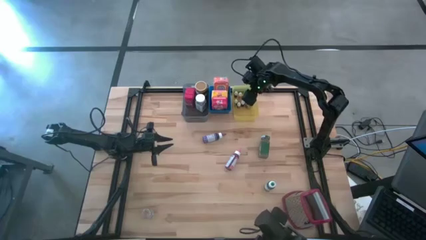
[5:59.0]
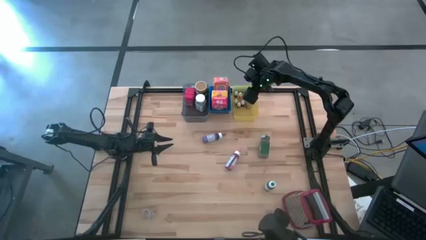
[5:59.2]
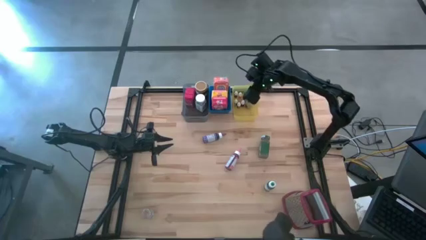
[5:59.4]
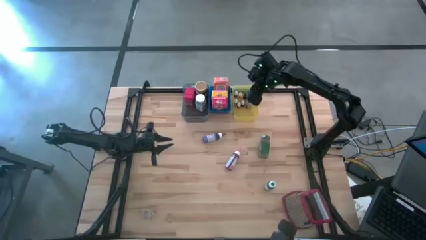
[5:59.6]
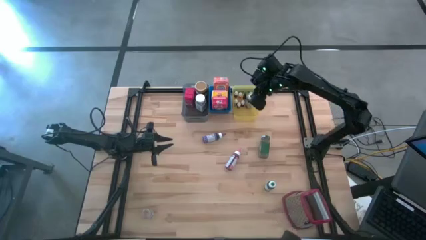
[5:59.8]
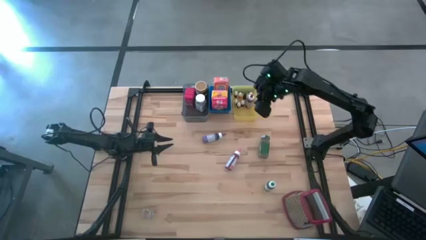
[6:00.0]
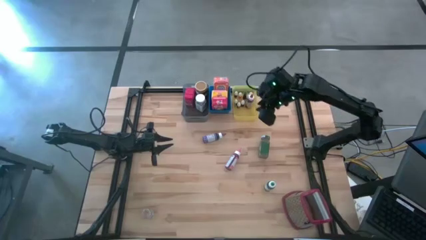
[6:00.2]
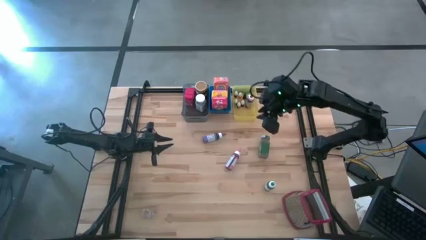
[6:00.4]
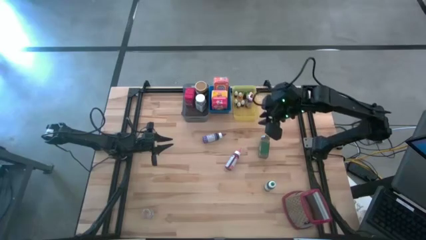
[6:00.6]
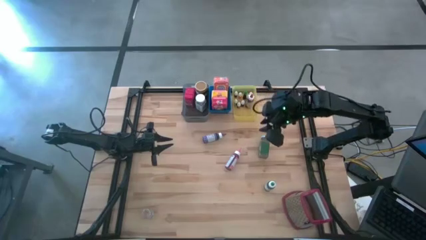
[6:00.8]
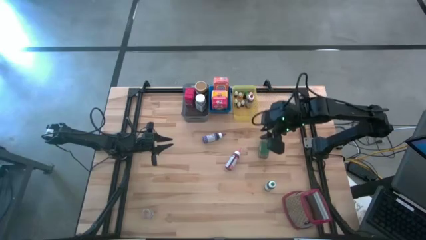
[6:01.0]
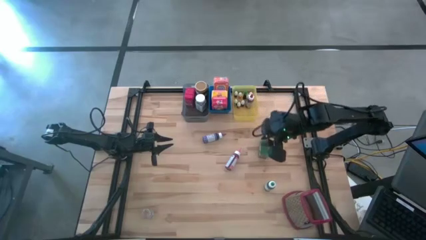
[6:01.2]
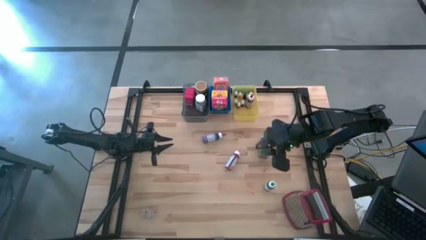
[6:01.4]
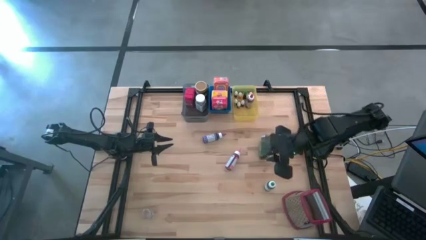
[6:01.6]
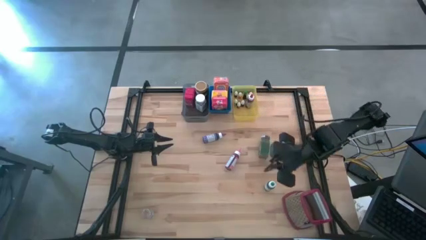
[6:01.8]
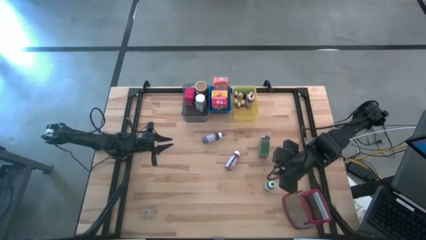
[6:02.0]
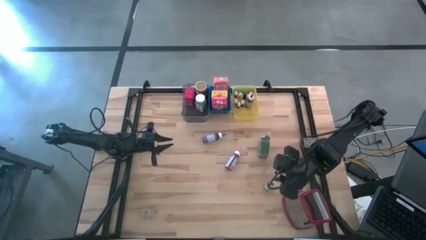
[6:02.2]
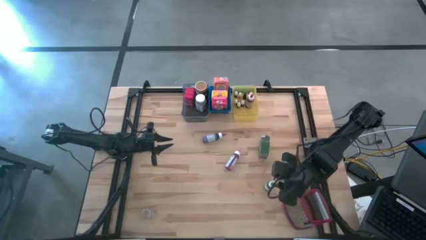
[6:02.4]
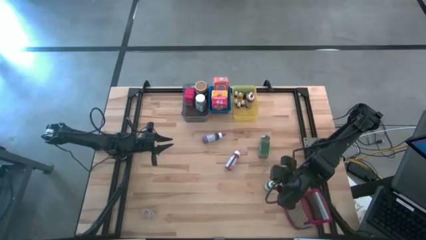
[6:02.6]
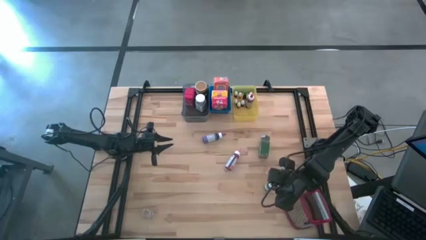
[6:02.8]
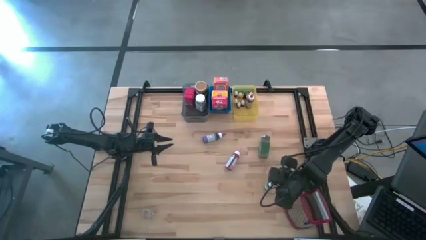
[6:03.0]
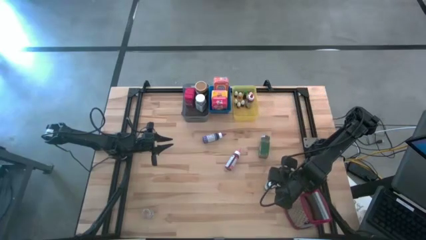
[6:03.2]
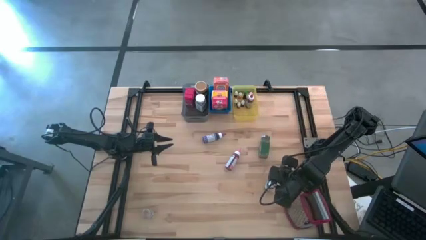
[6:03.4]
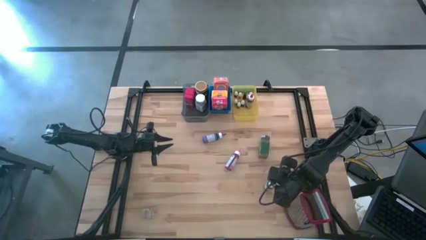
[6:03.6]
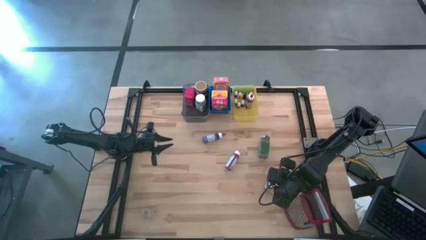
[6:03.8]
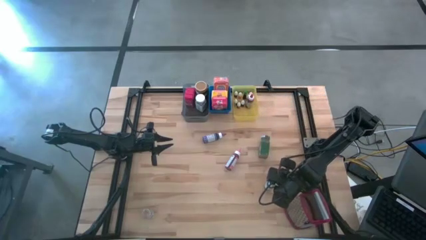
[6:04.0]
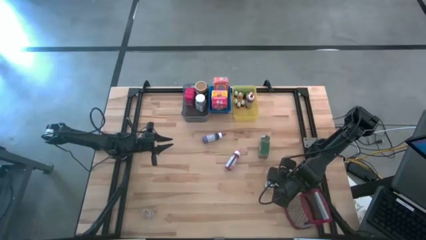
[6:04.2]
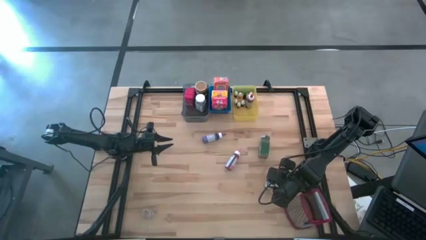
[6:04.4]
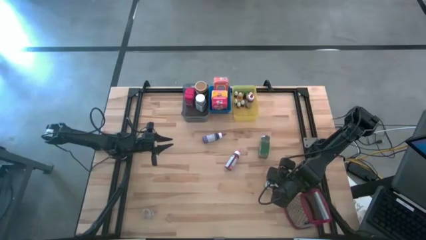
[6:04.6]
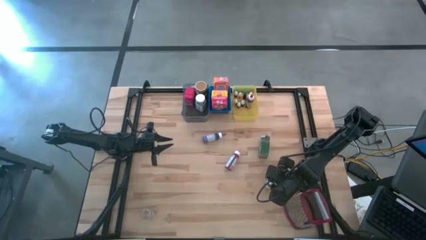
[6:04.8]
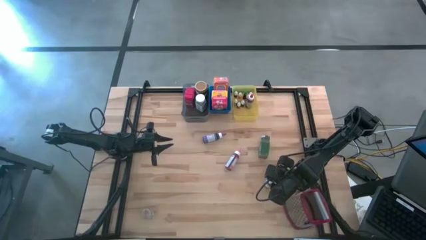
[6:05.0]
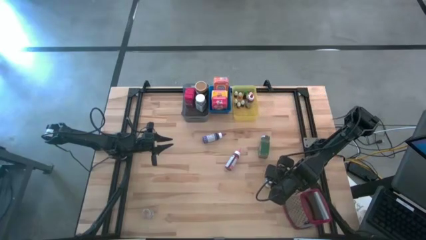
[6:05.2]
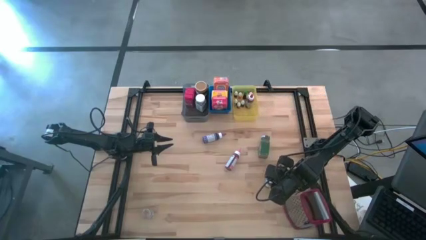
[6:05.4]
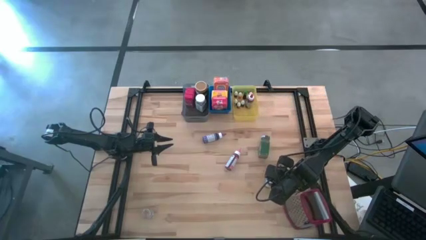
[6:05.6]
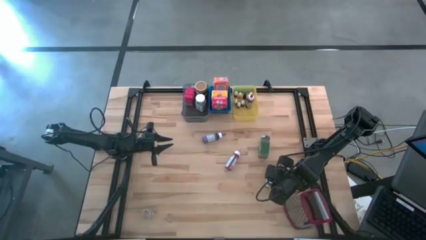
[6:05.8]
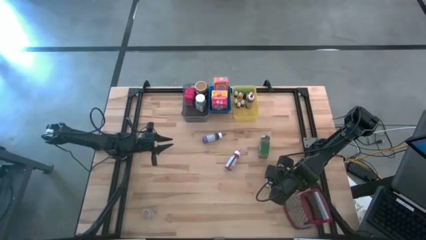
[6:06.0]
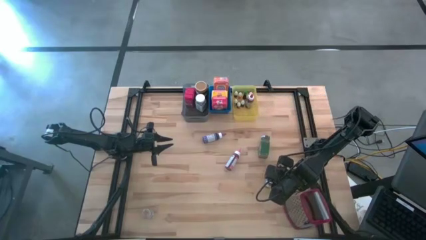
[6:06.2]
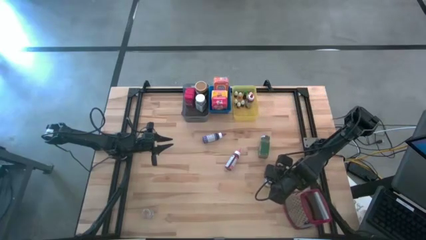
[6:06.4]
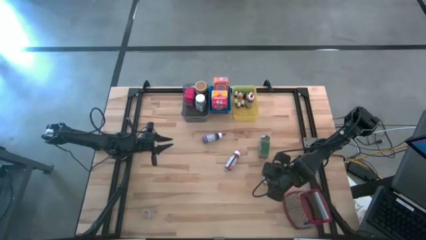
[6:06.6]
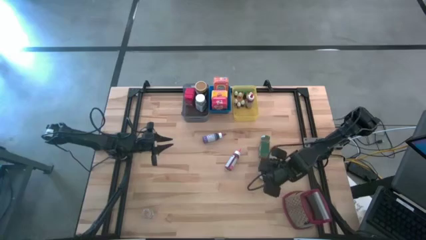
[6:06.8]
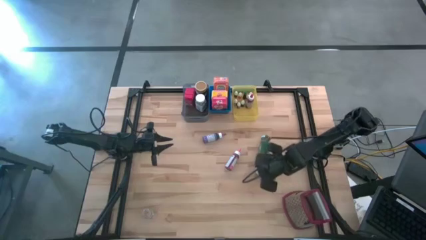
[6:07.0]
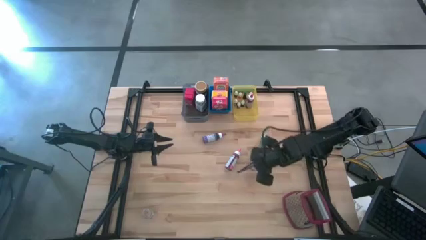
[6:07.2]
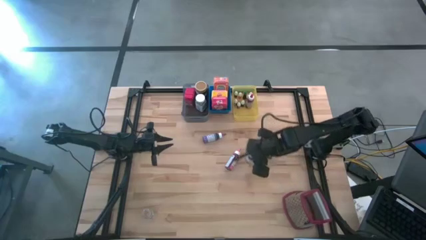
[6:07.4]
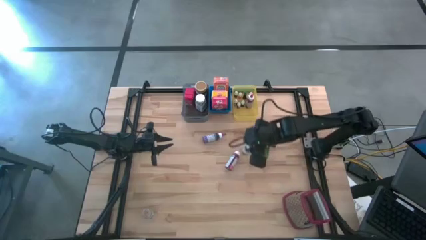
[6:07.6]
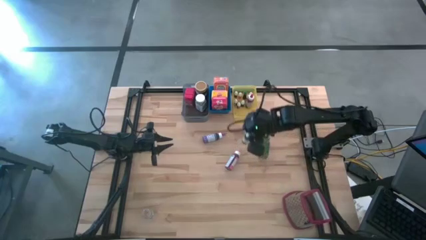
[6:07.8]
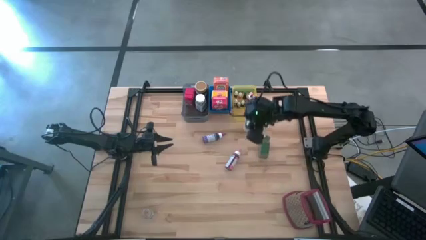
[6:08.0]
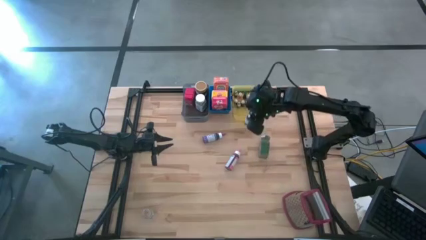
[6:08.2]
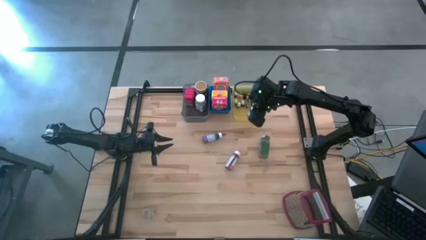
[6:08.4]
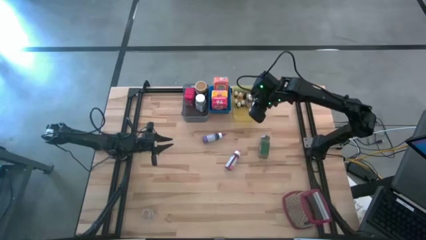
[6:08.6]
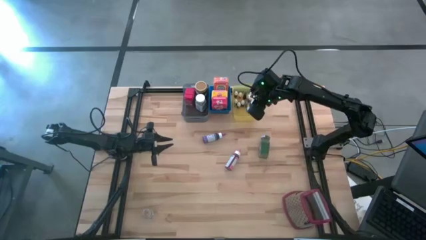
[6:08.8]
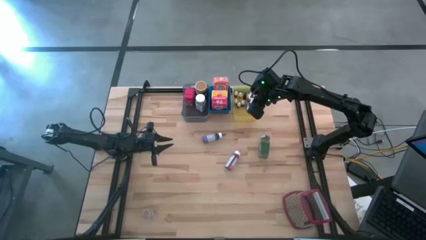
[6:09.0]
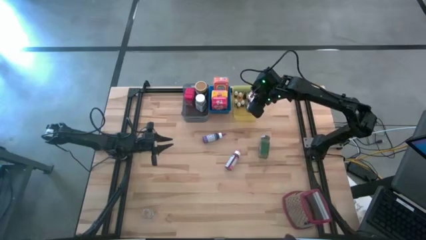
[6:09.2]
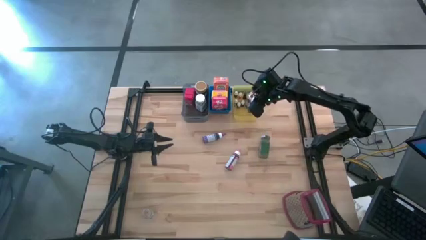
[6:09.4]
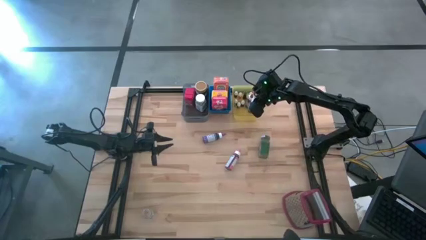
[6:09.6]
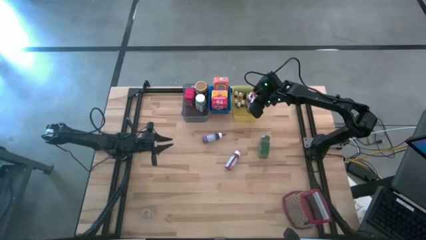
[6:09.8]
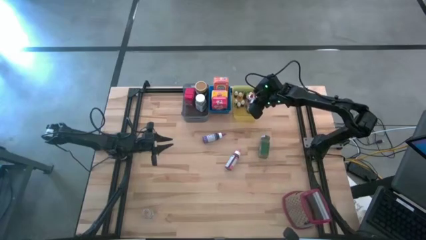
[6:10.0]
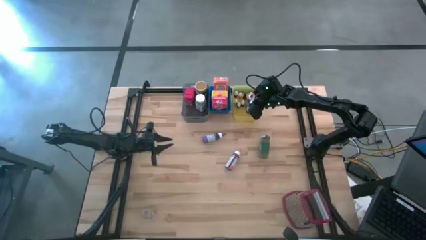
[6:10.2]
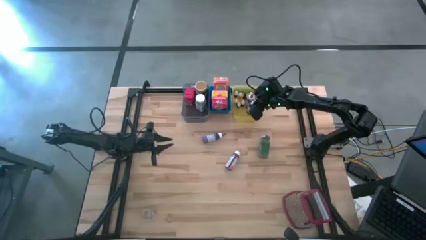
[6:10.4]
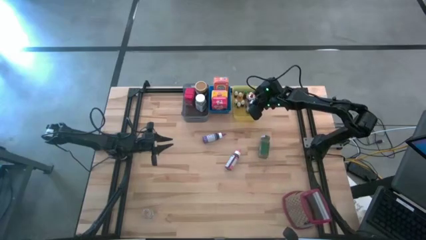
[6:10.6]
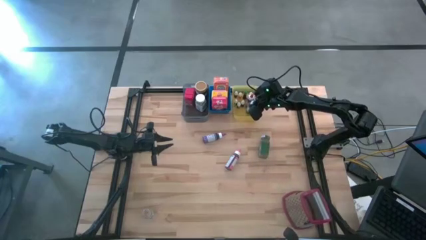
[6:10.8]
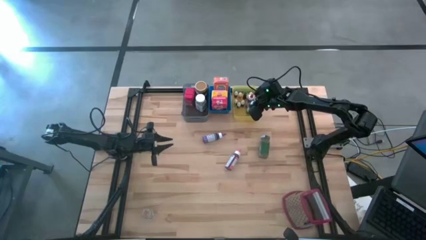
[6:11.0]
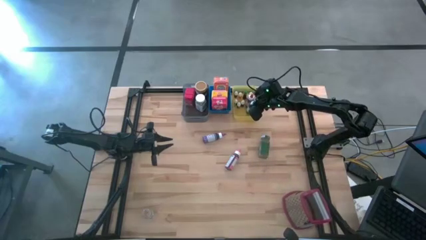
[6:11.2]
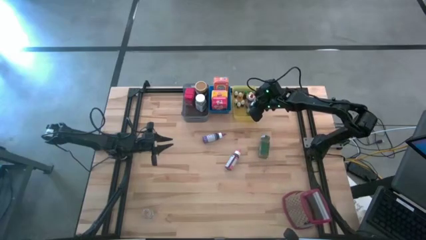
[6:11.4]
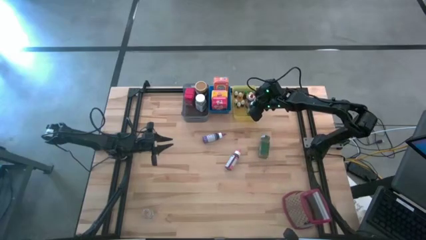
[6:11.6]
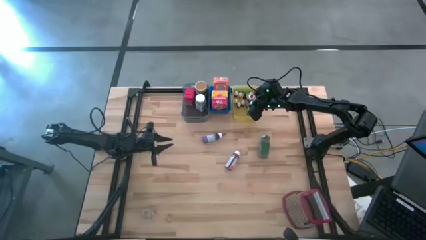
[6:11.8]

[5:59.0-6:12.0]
Task: Pick & Place Kitchen Items
Put the large green food coloring bottle into the yellow bin

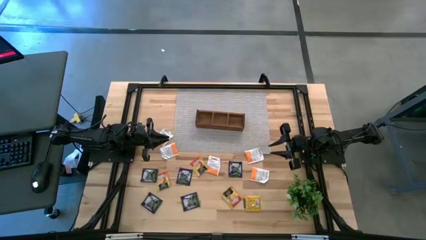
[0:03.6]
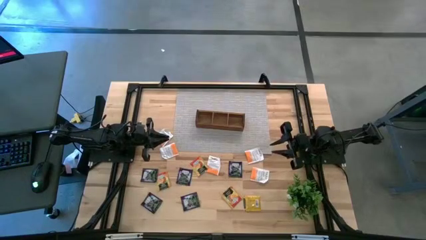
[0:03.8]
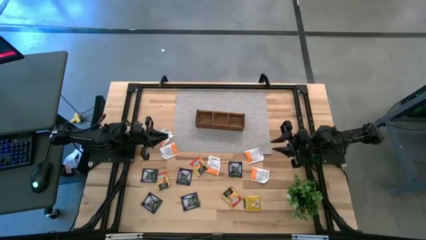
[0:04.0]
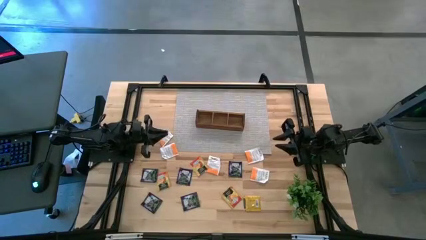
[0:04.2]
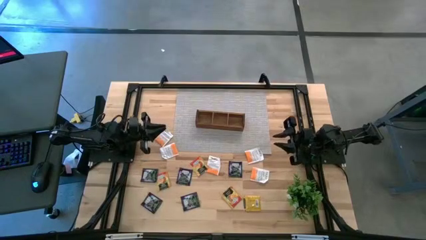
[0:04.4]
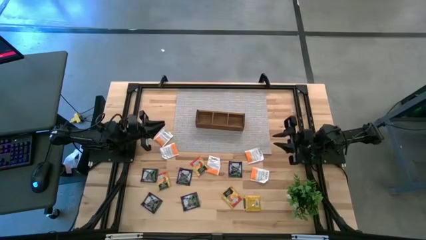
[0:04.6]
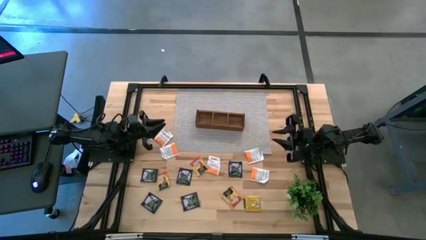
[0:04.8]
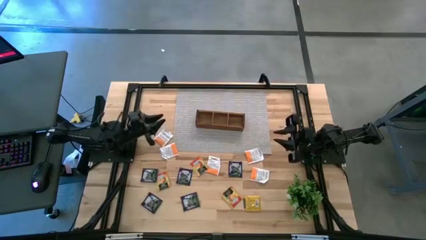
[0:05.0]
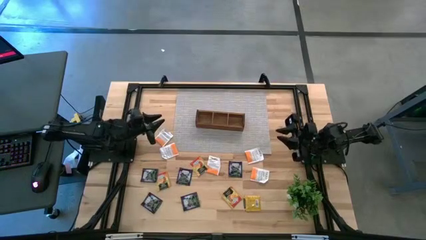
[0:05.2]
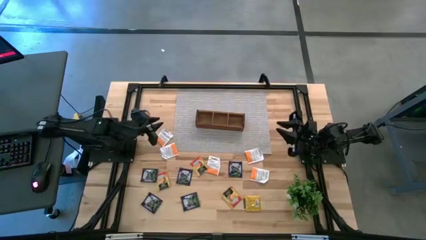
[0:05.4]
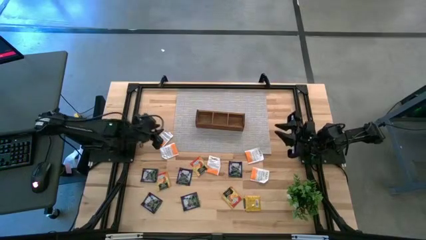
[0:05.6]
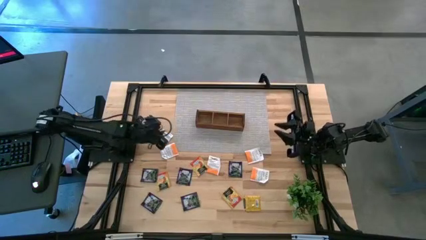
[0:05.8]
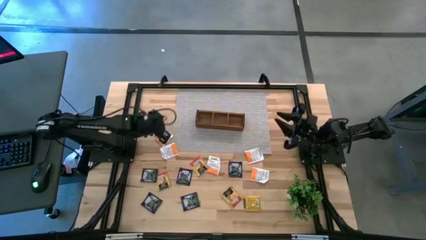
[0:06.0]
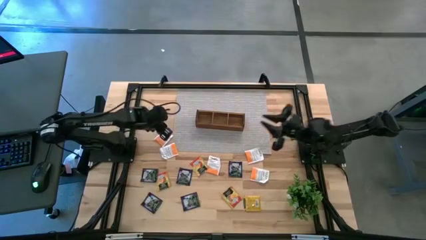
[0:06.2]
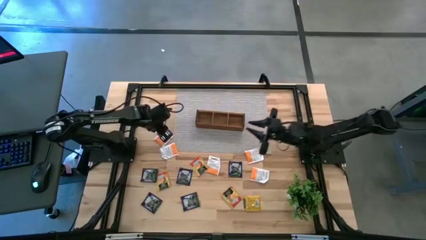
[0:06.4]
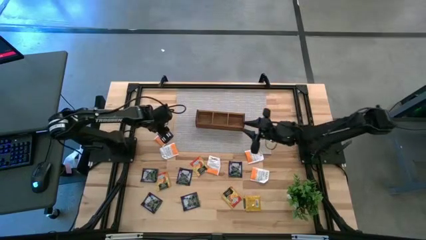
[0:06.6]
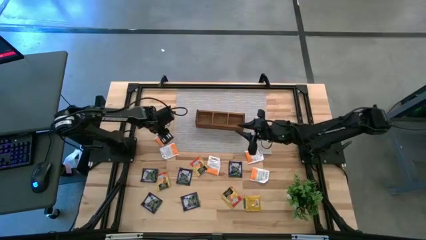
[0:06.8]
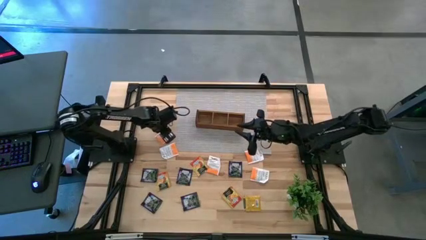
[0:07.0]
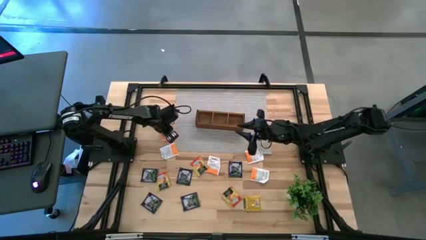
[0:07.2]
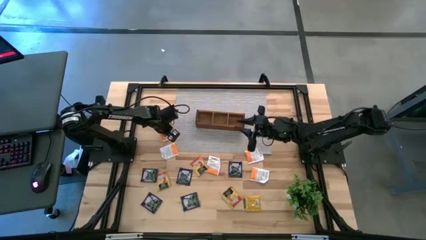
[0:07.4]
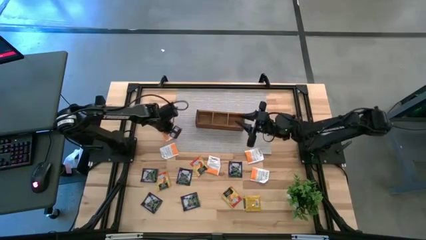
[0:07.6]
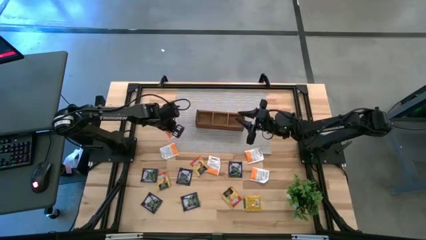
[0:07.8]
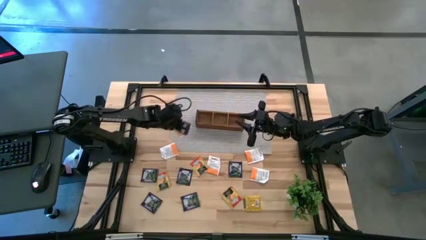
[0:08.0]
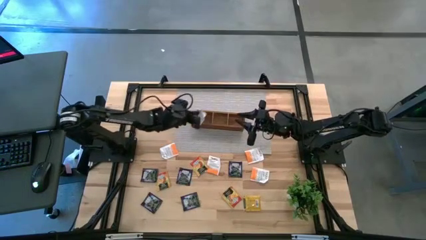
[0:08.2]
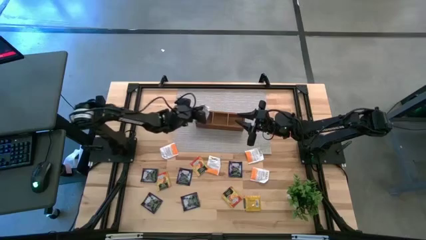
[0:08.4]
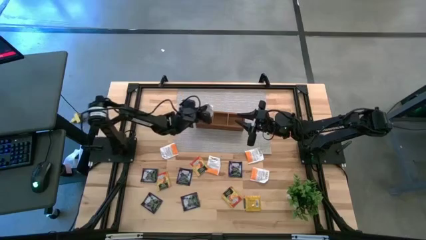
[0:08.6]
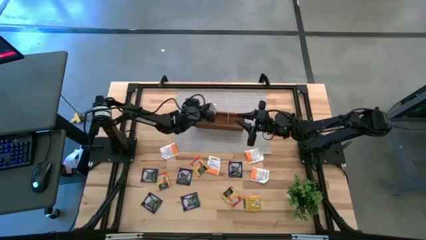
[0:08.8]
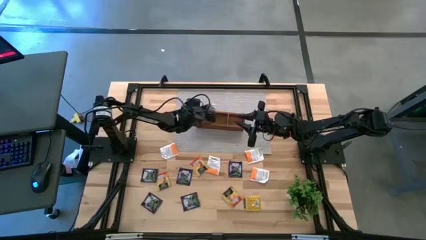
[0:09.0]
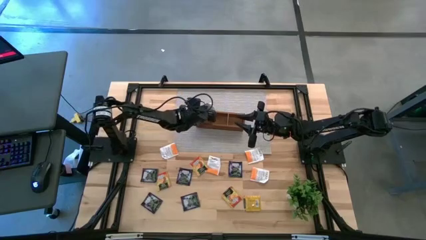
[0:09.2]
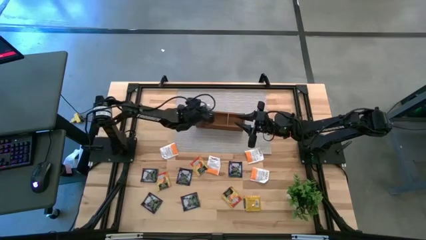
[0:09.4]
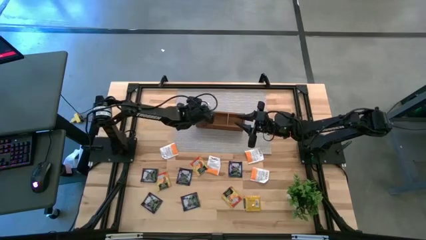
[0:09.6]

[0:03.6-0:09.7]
Task: Pick & Place Tea
Put the orange tea bag into the left section of the wooden organizer
